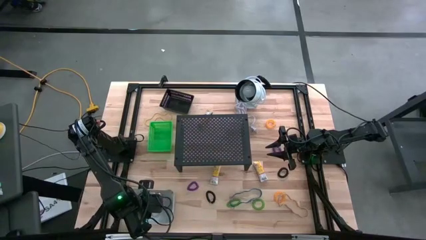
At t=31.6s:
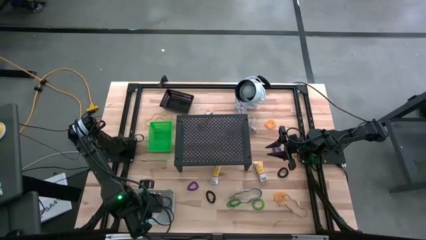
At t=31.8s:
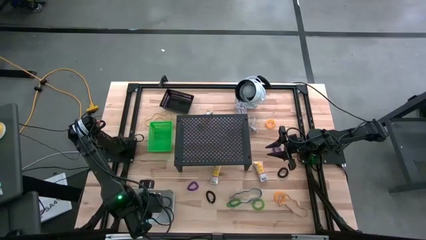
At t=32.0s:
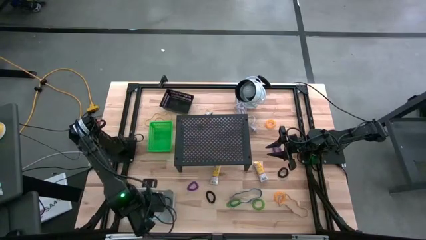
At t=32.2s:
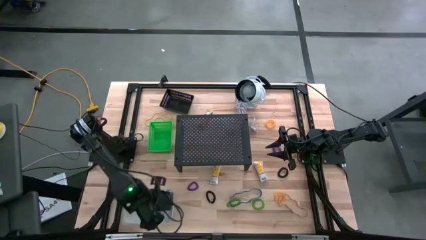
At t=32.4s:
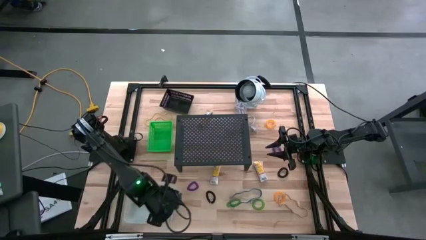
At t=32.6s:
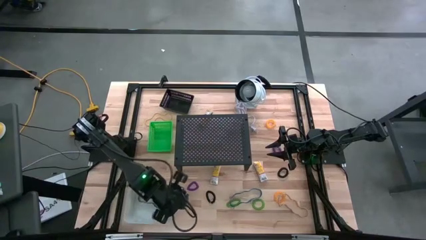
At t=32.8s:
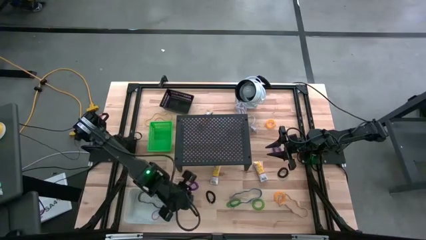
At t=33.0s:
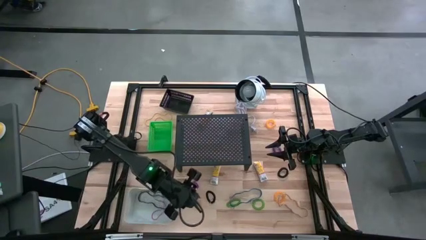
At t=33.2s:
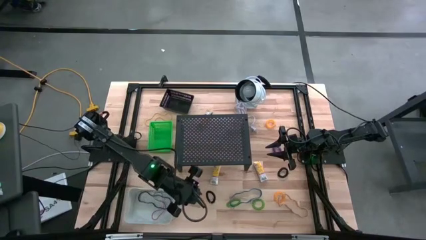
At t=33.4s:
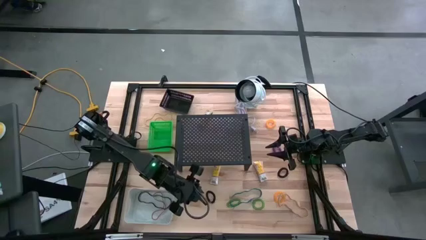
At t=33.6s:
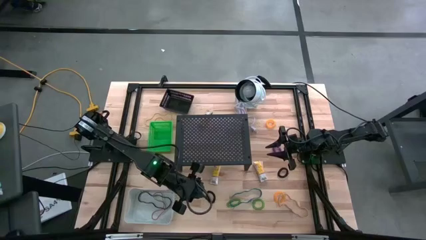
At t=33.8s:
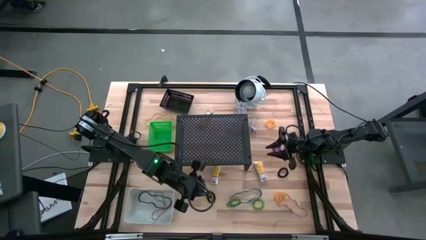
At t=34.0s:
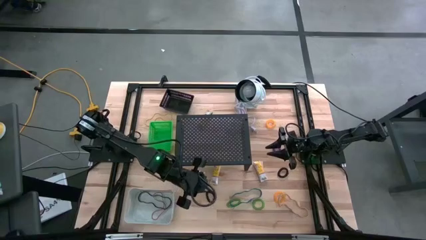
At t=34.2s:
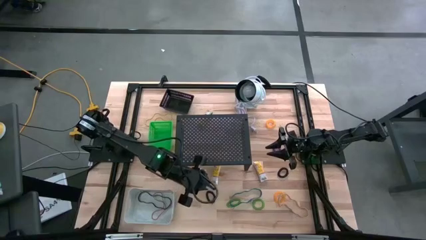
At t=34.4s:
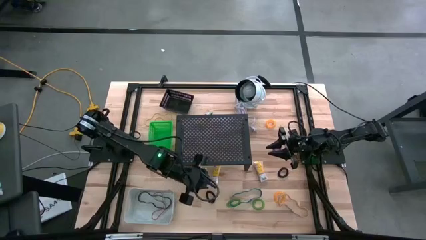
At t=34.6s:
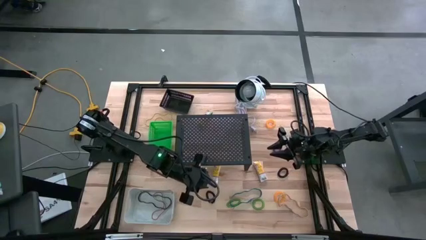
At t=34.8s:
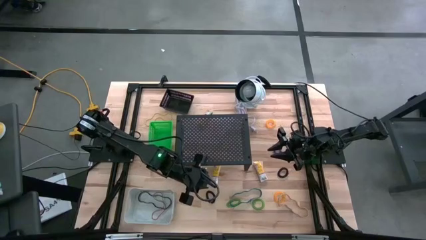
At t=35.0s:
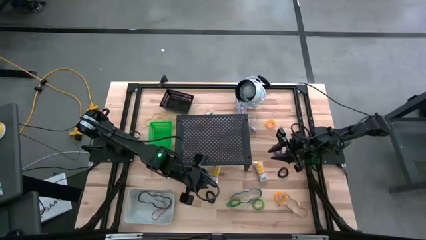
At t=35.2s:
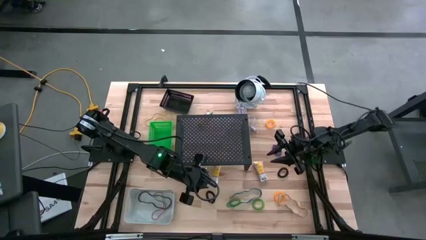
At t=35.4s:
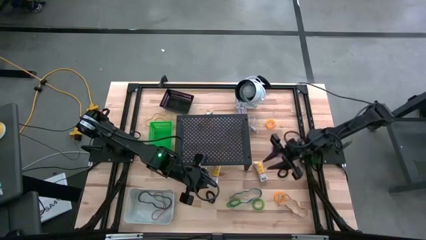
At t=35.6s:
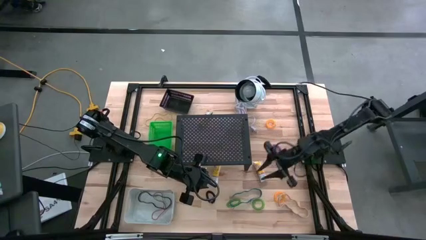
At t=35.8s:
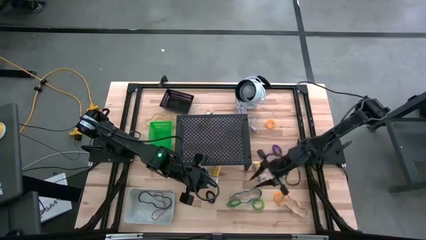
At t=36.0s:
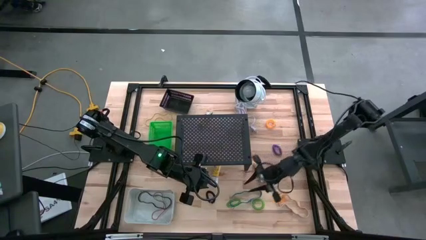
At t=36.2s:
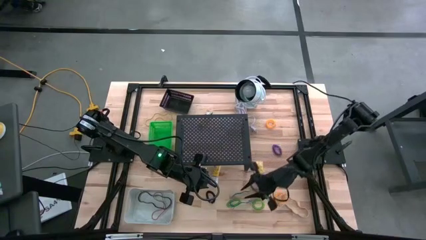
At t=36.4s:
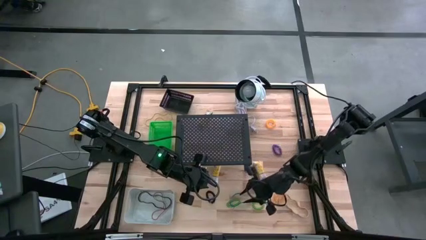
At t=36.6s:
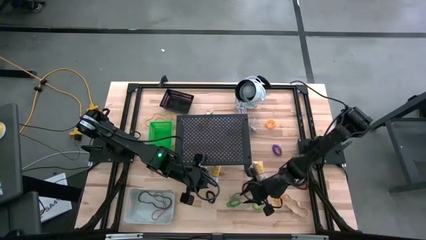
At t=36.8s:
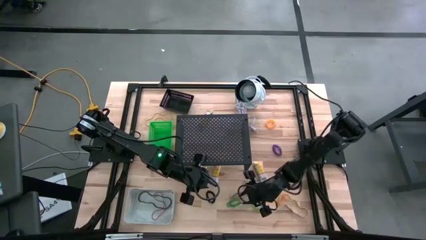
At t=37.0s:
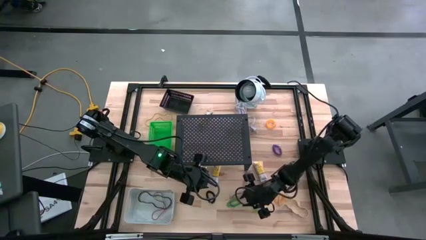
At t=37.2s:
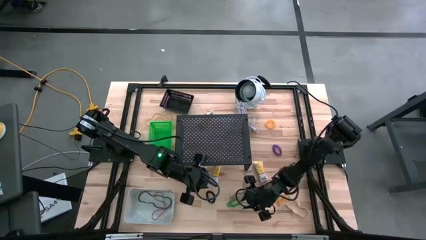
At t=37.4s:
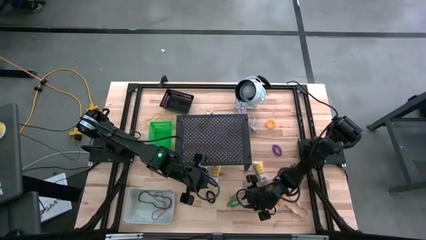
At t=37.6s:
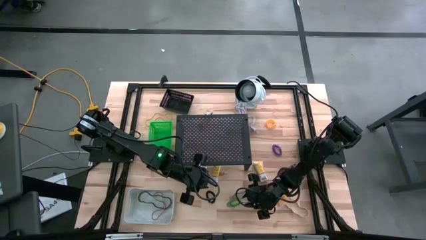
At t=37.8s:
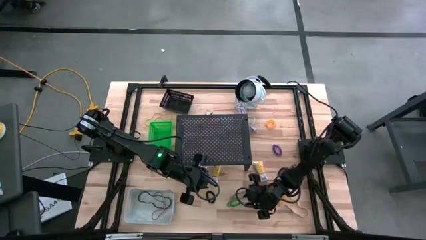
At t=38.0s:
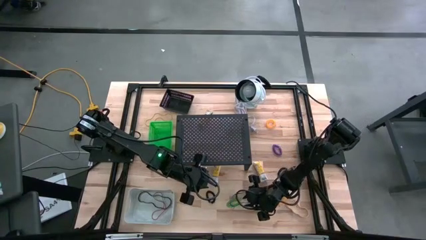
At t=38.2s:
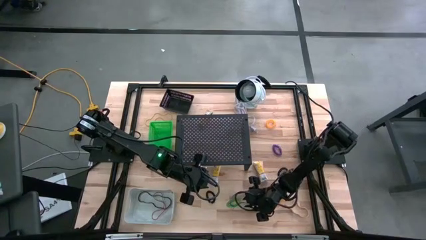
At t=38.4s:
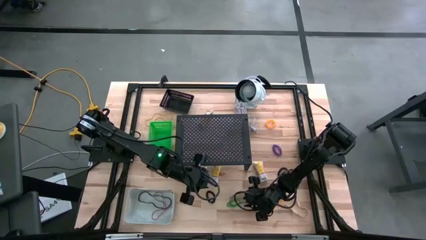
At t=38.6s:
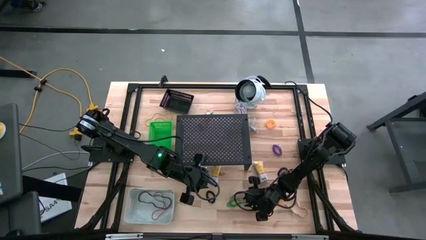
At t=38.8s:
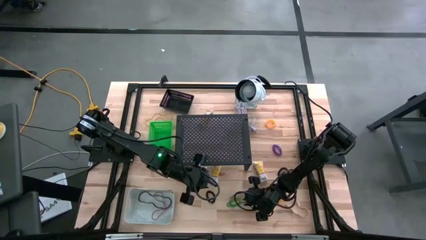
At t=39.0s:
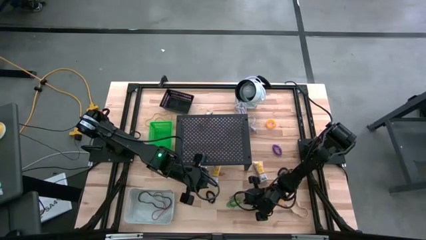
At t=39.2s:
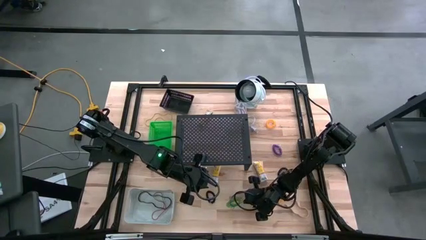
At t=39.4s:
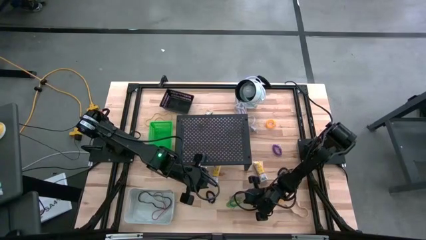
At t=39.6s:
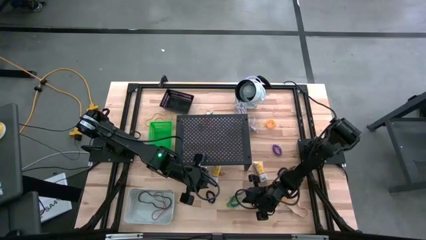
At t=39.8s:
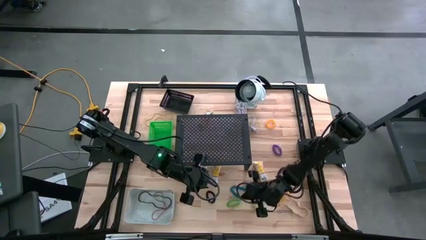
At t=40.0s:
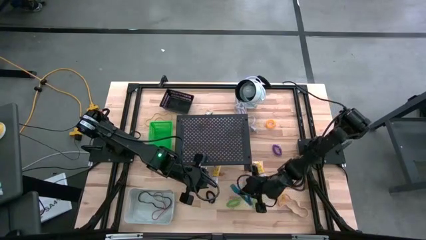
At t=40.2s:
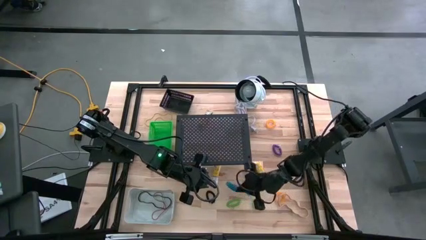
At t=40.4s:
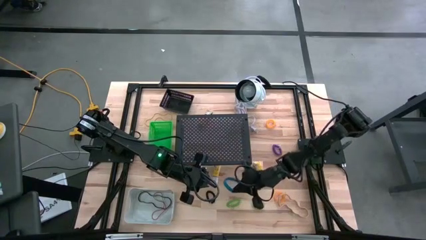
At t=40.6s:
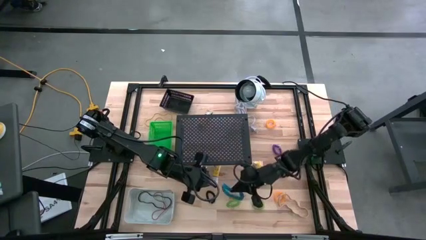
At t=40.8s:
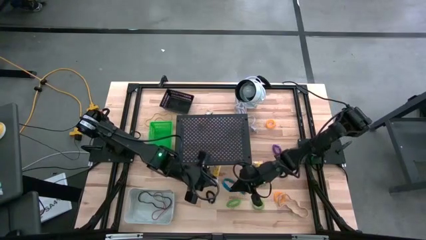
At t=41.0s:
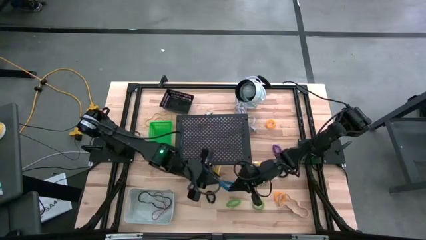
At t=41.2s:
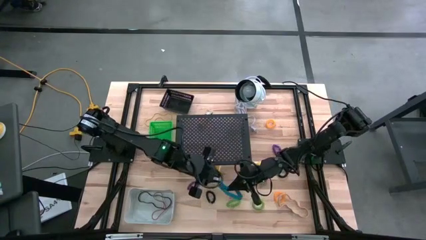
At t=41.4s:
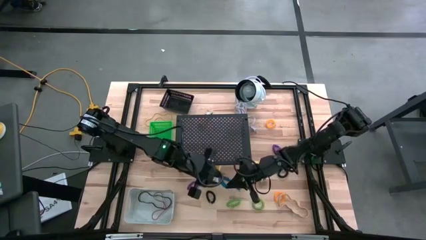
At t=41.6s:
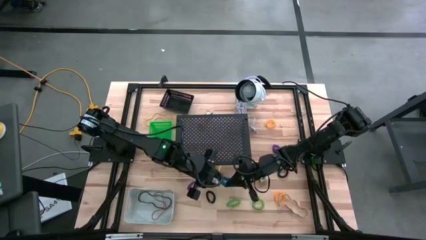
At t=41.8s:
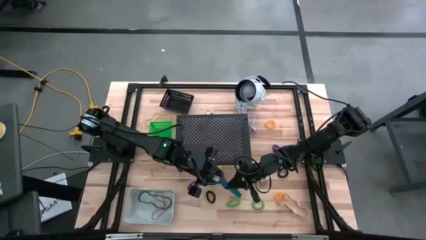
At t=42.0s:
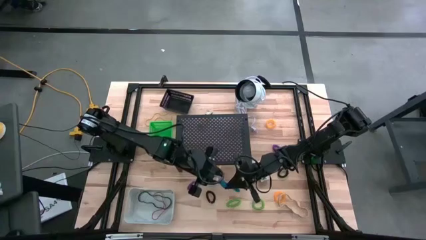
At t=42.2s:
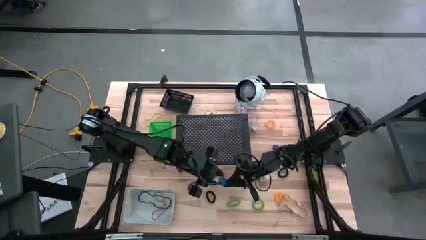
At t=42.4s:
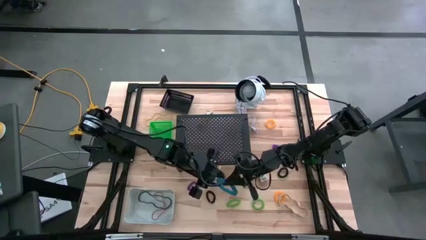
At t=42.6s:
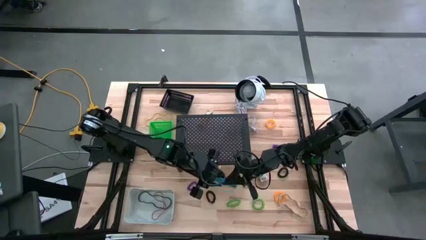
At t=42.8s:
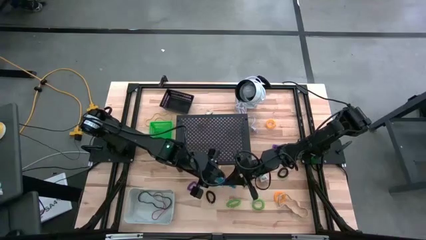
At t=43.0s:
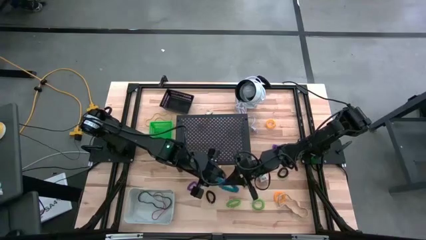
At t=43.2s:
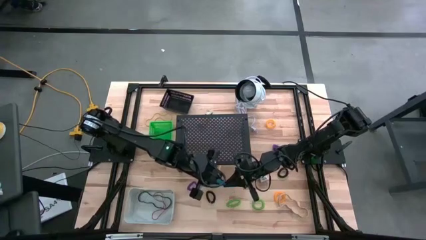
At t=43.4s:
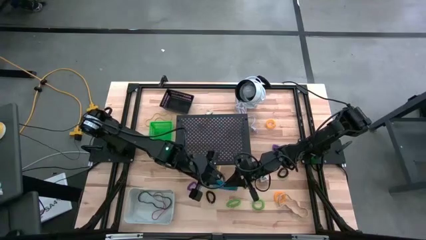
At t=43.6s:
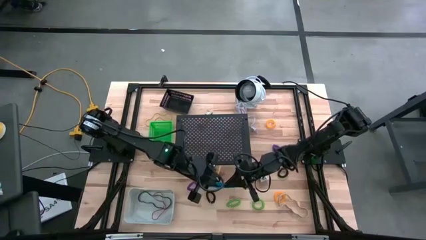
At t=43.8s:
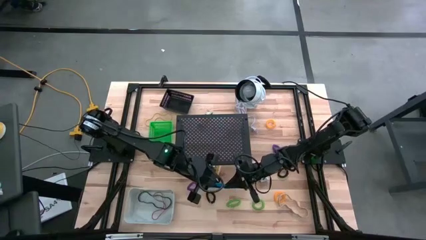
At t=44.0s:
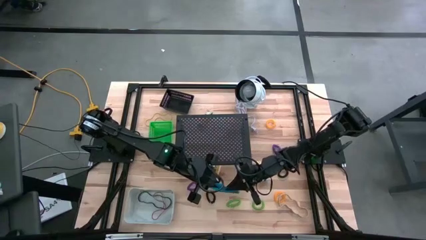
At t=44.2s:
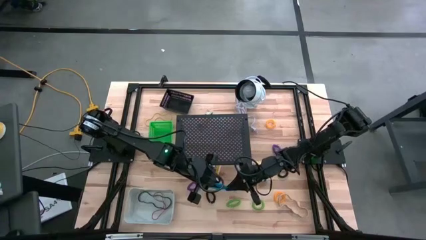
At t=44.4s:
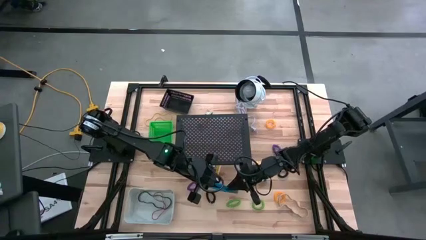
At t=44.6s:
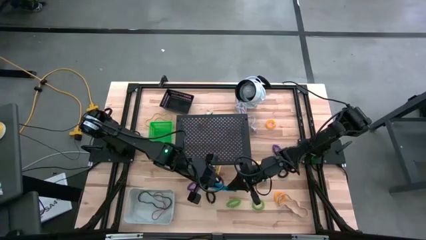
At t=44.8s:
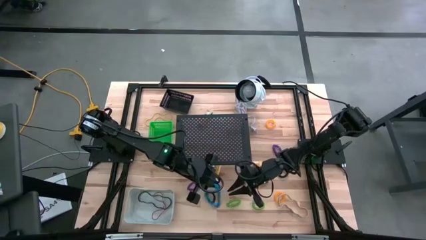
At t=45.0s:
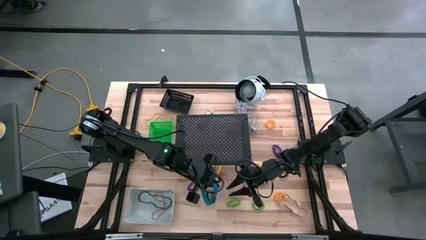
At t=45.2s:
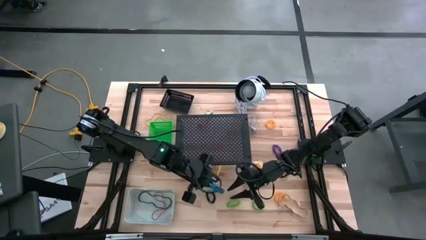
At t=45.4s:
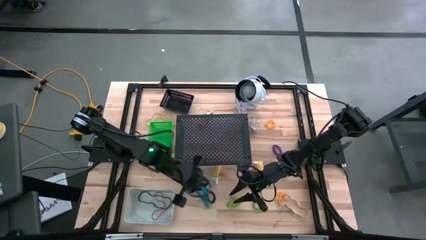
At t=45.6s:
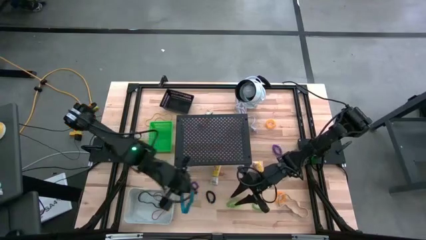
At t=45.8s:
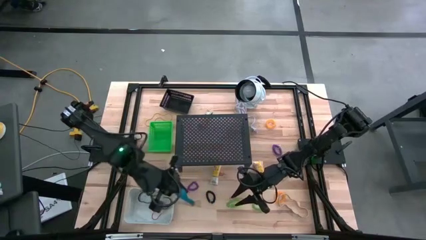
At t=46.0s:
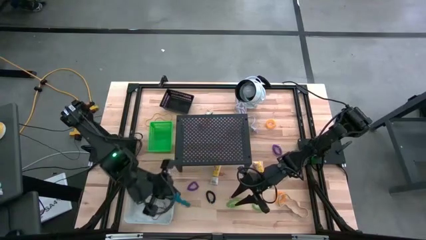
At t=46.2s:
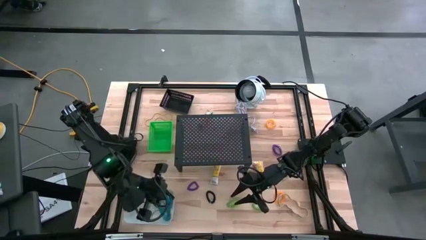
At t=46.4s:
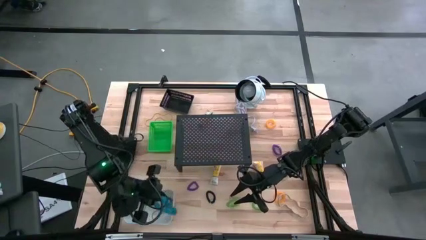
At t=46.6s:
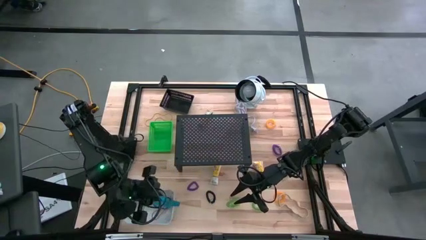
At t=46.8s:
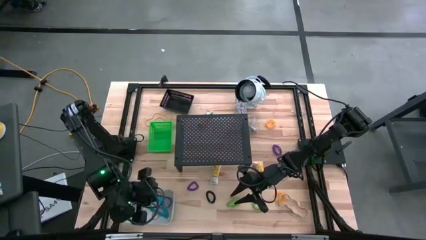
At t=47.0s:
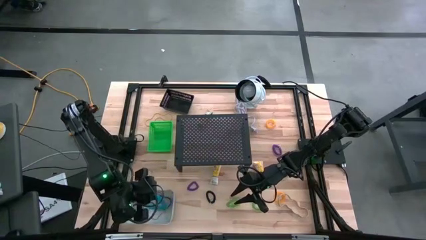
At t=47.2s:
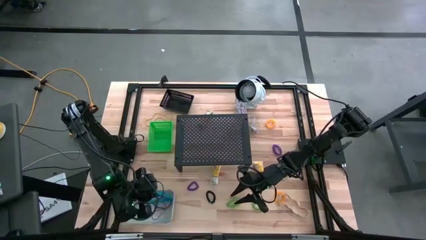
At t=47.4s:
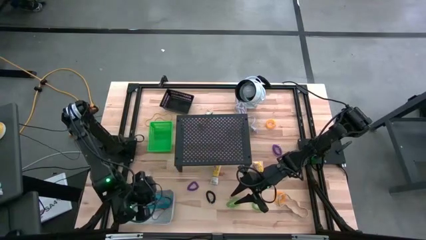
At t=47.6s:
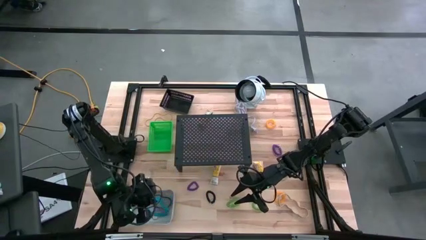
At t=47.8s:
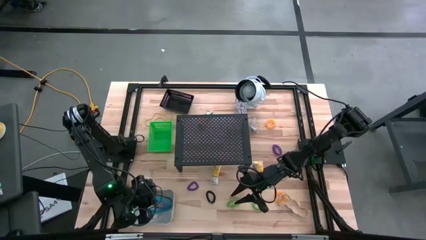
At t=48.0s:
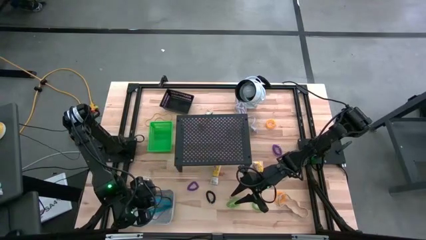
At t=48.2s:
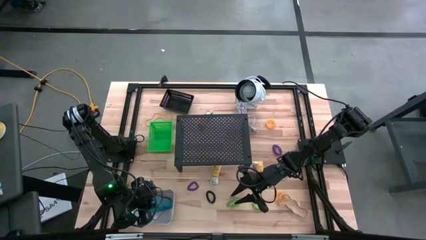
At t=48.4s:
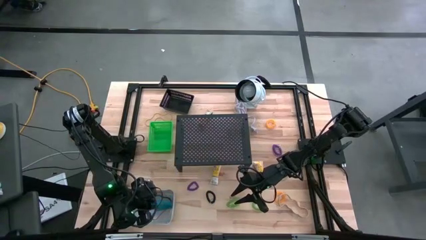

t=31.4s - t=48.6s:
Task: Pick & Place Office Desk Supplies
Put the blue rubber band into the white bin
